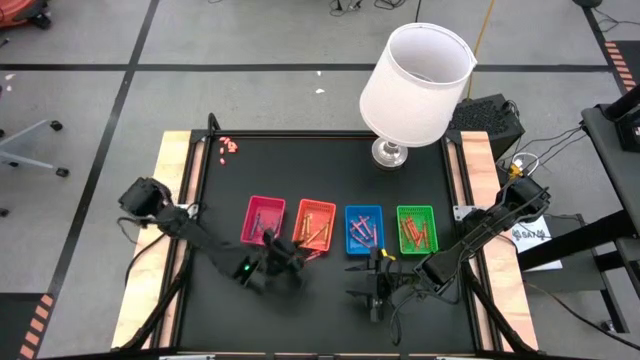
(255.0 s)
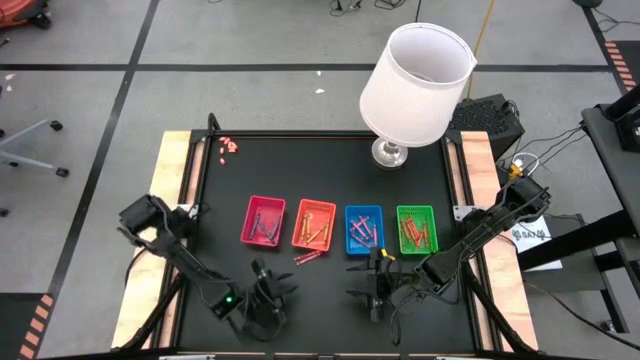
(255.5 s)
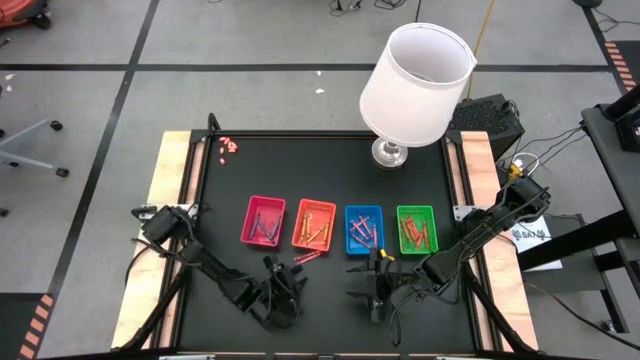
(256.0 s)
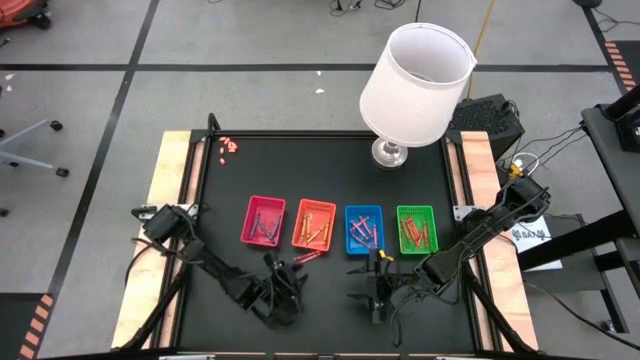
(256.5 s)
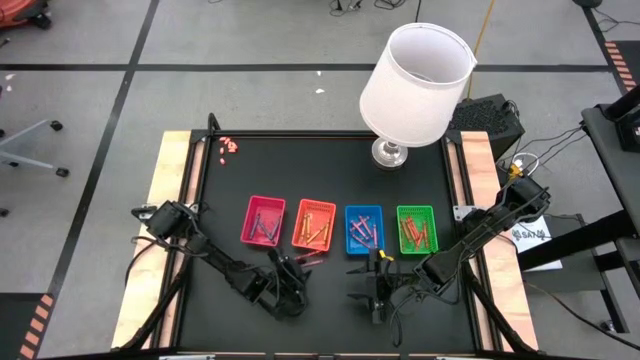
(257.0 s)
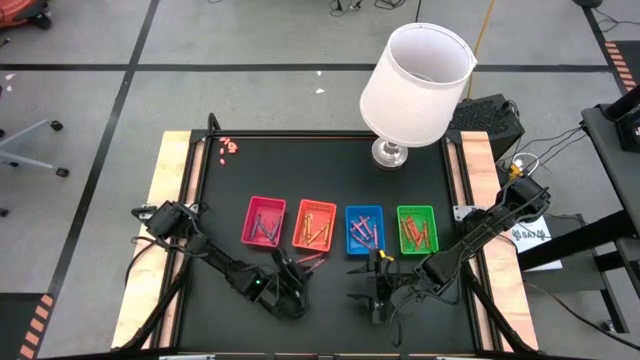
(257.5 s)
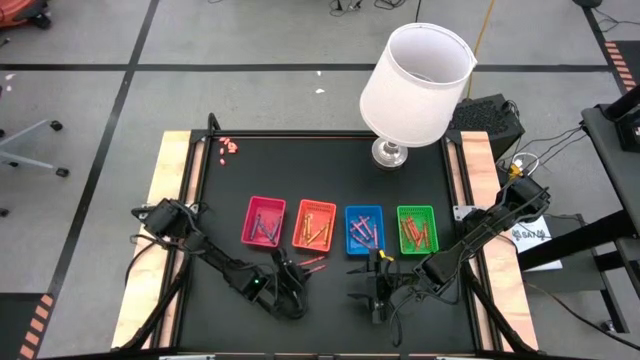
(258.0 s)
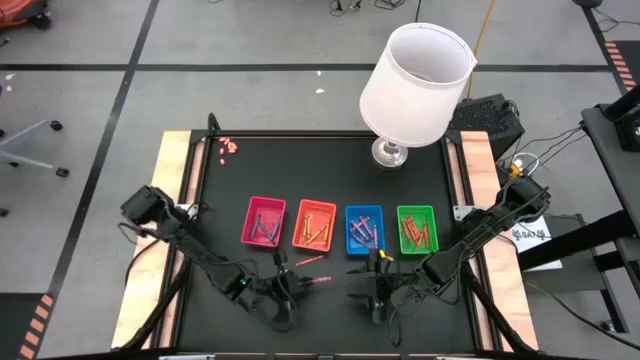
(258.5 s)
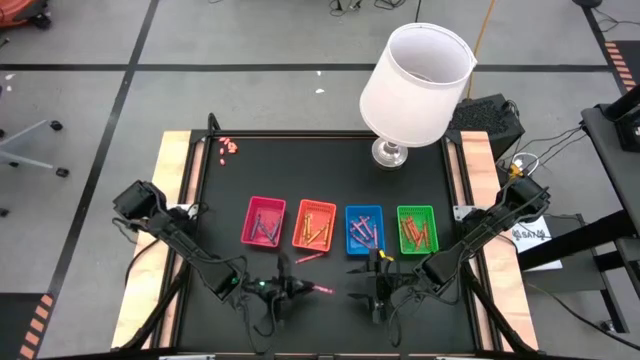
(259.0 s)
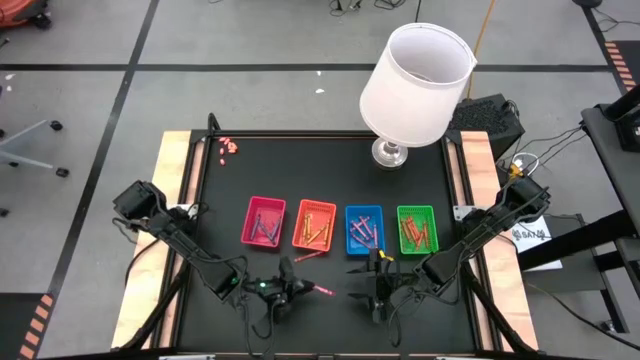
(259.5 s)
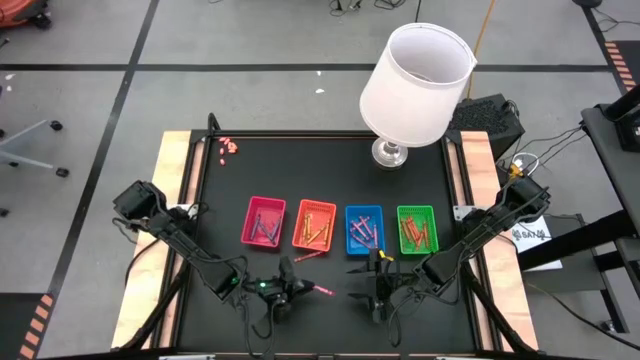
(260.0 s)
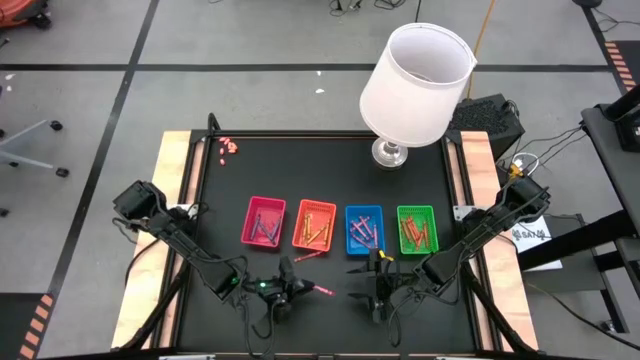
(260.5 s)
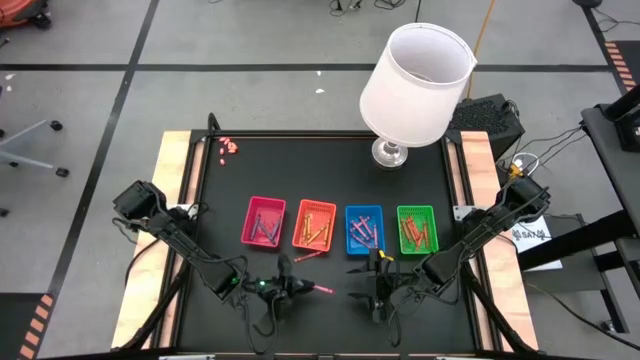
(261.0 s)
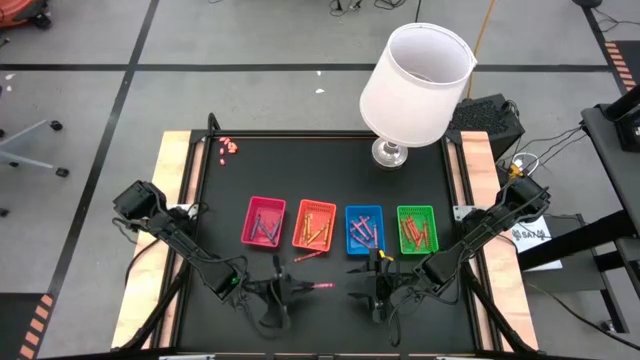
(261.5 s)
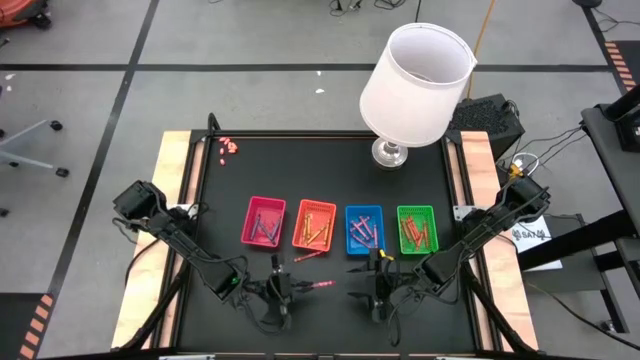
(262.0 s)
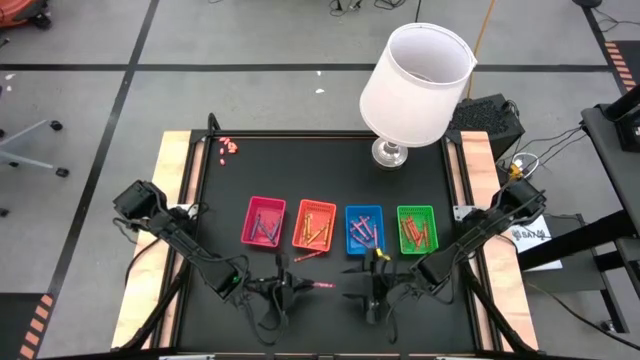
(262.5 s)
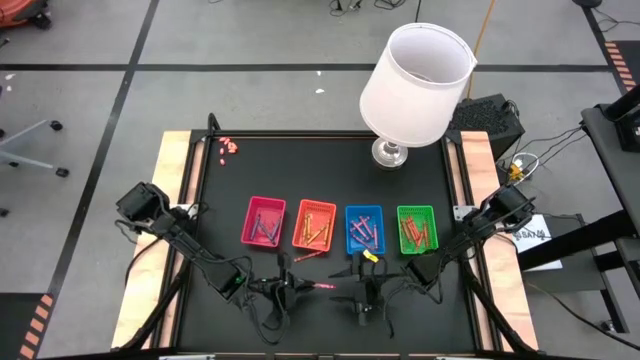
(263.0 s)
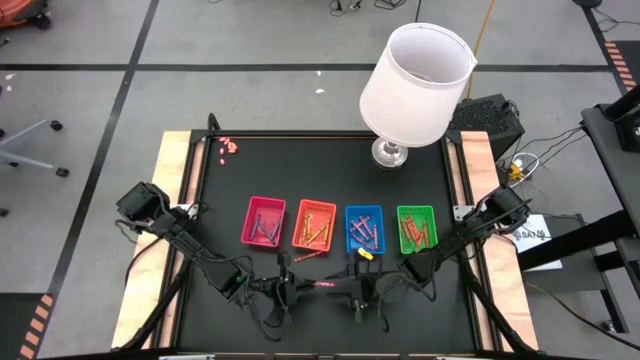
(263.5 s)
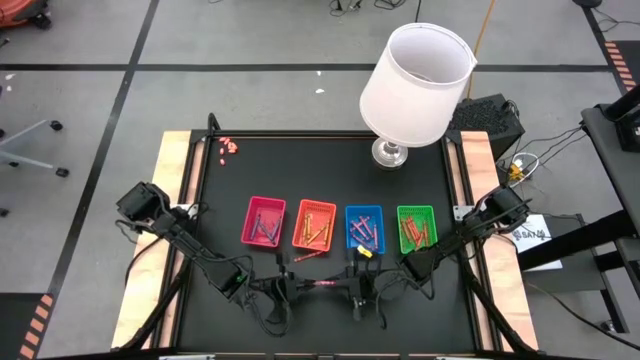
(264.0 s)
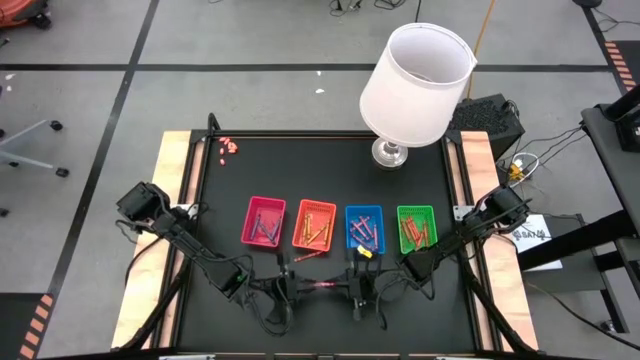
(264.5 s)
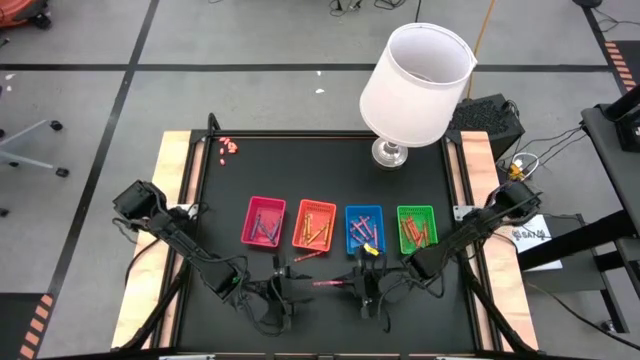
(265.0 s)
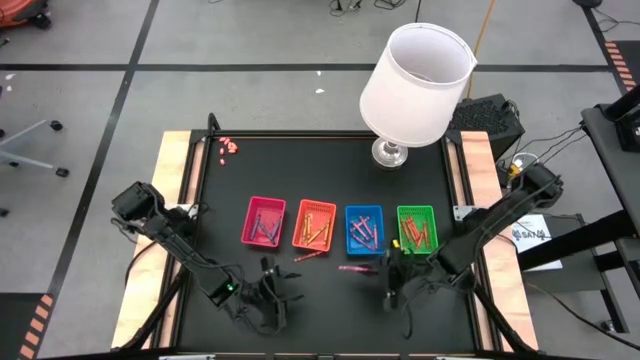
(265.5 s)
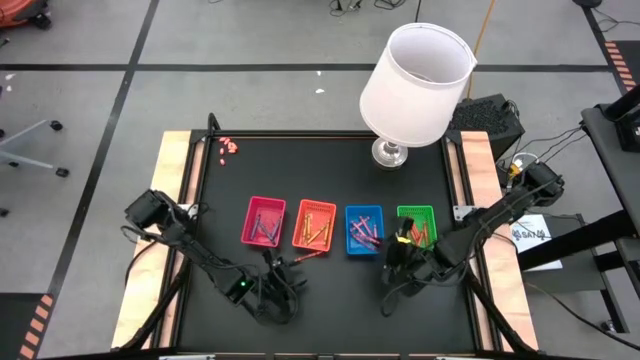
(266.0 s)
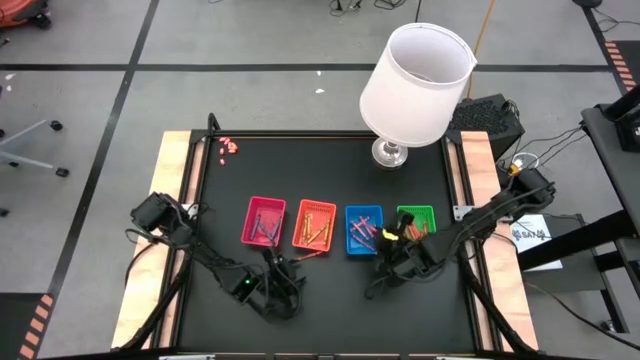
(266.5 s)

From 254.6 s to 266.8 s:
Task: Sort crayons
Put the red crayon into the blue bin

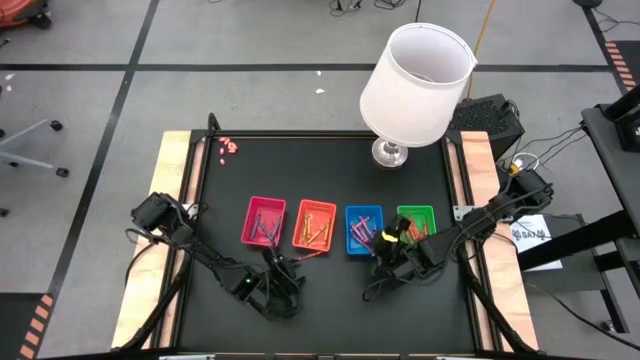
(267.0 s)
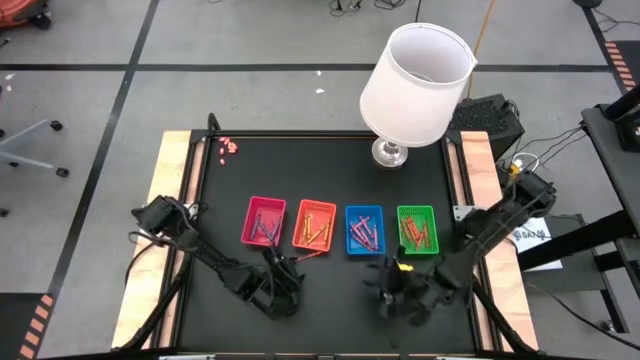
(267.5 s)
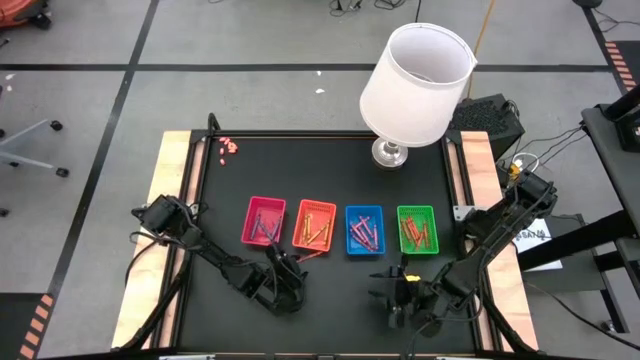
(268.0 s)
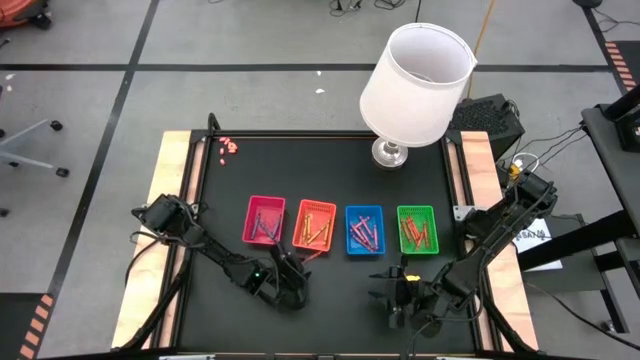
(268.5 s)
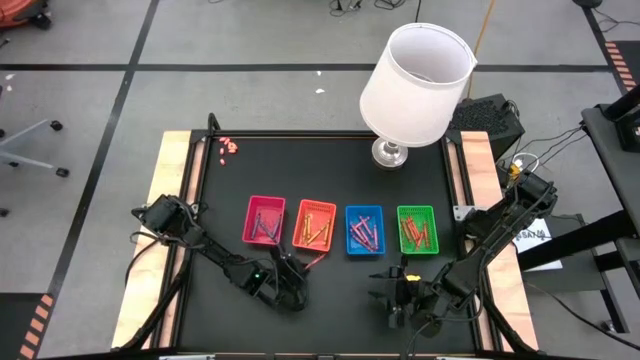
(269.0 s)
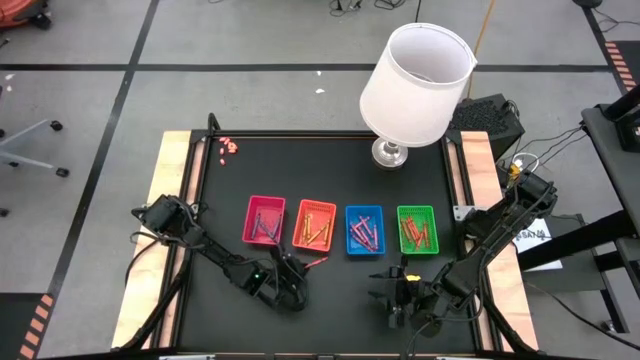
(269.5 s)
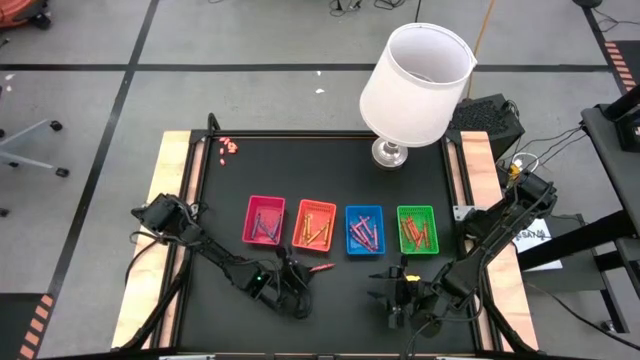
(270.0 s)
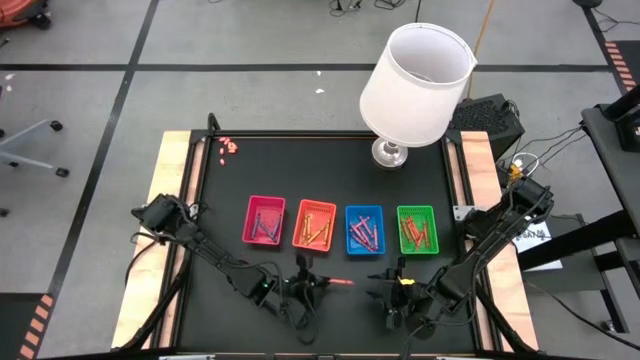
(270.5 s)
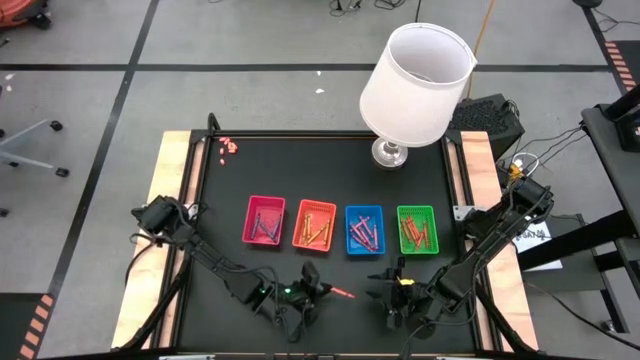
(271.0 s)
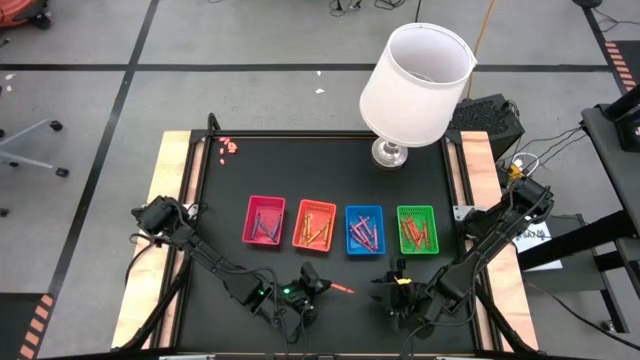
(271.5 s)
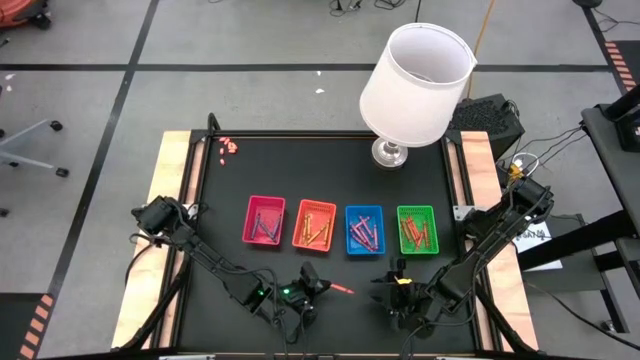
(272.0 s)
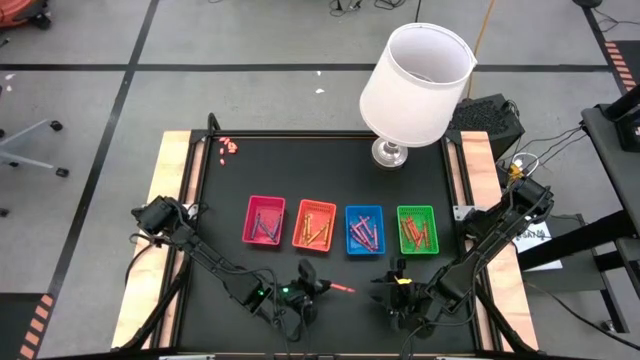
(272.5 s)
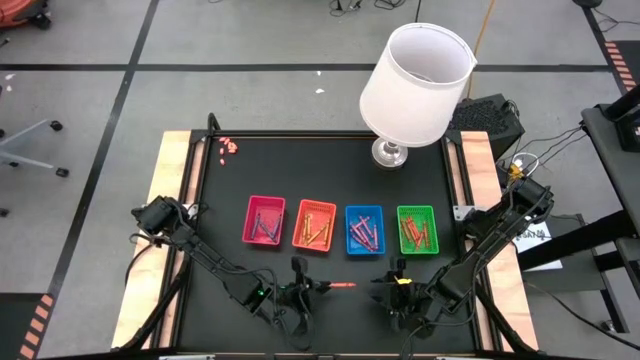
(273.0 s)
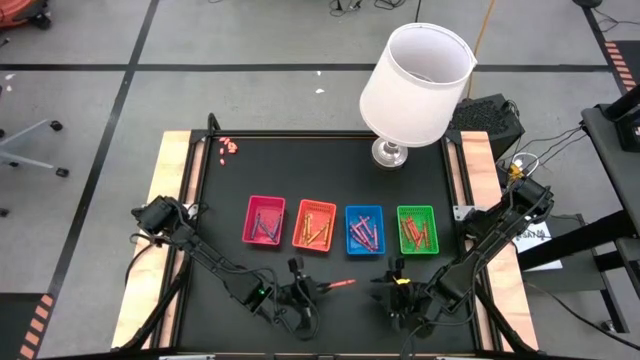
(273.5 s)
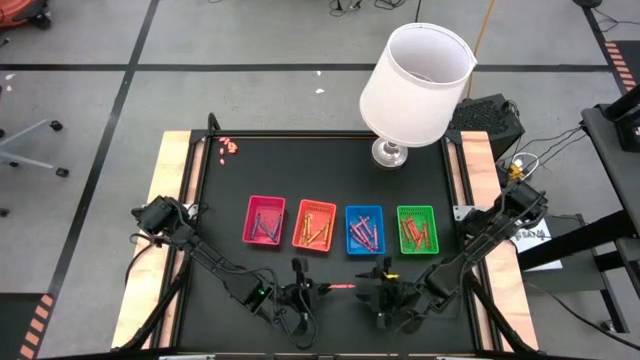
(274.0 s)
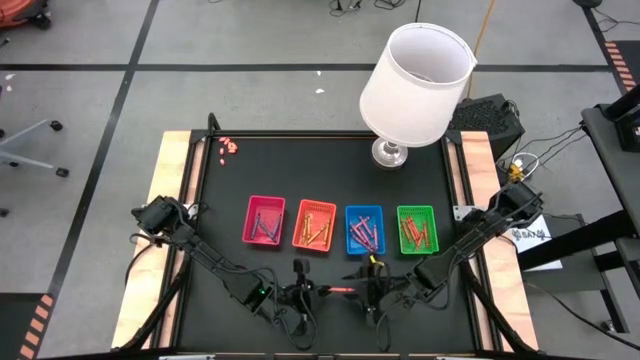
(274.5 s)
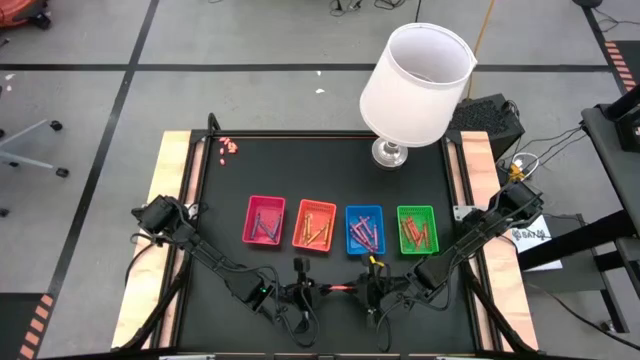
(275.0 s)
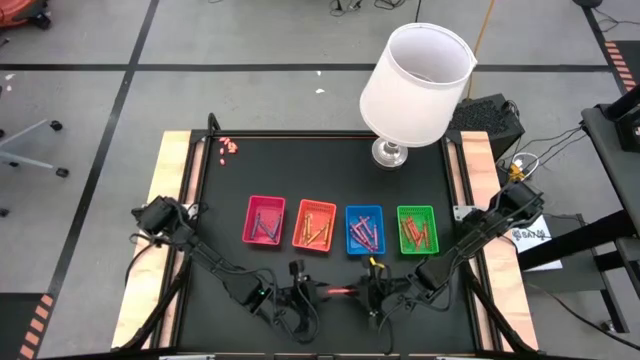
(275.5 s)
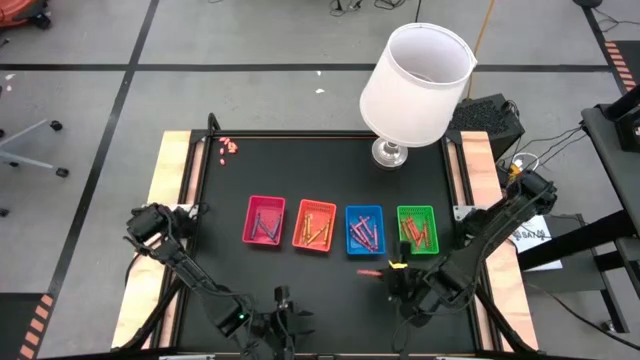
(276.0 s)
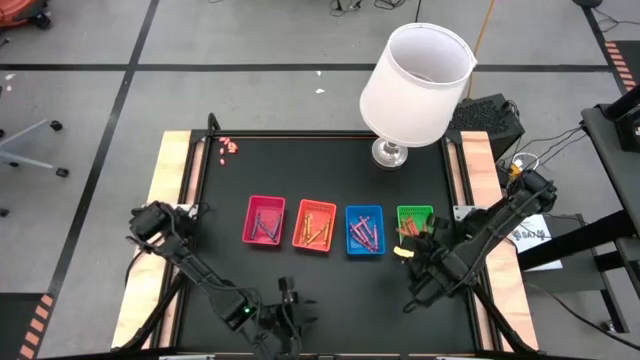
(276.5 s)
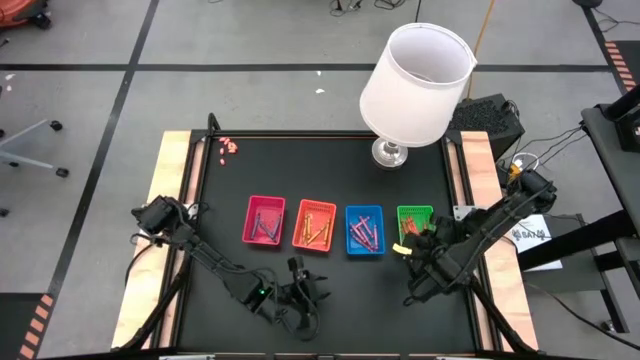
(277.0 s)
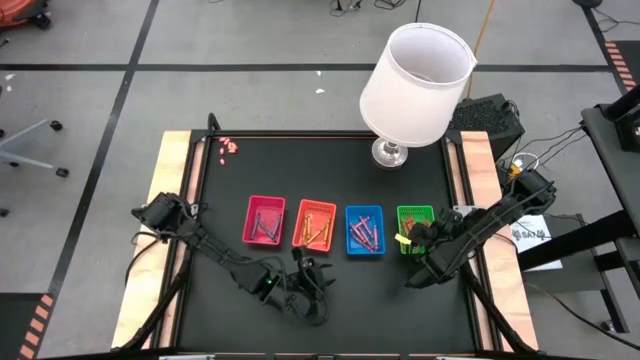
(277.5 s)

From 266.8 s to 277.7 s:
Put the orange crayon into the green bin
